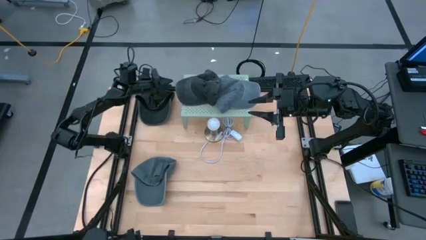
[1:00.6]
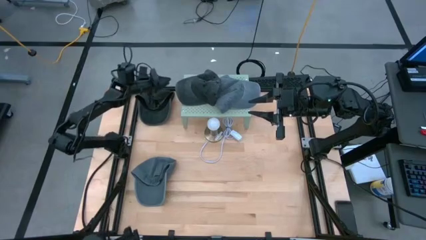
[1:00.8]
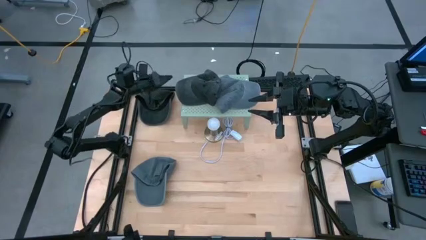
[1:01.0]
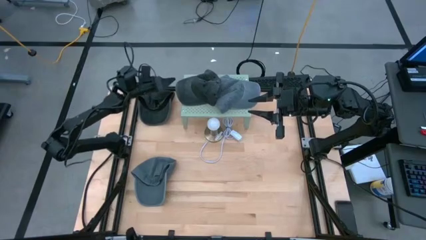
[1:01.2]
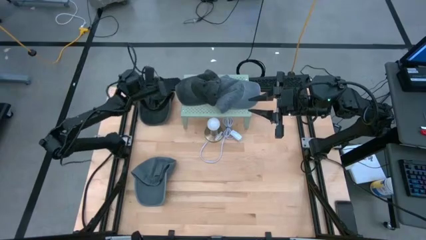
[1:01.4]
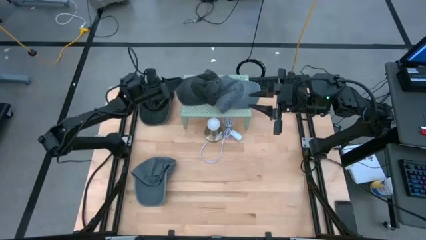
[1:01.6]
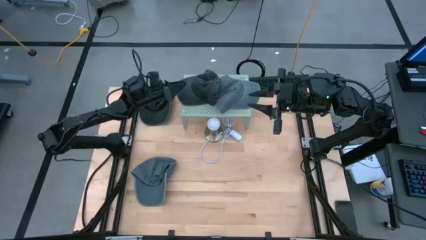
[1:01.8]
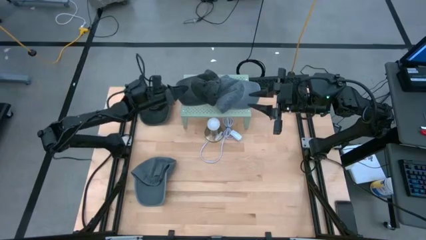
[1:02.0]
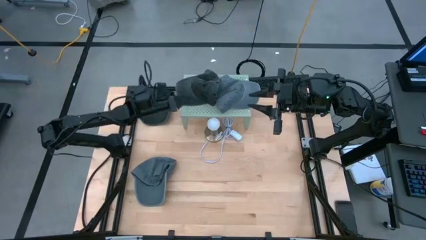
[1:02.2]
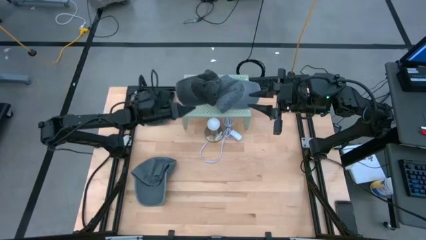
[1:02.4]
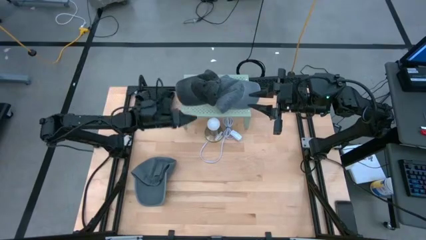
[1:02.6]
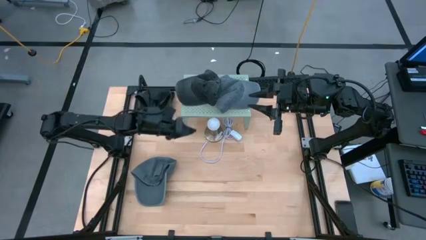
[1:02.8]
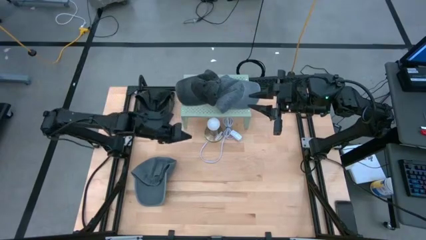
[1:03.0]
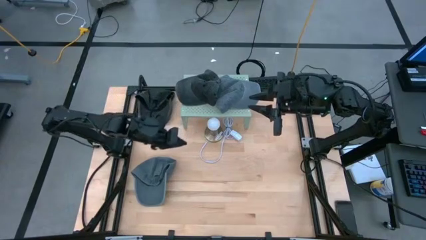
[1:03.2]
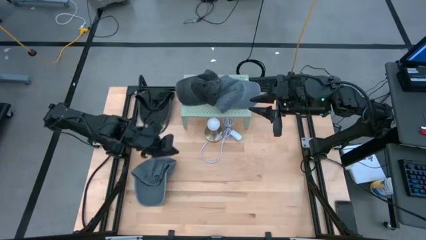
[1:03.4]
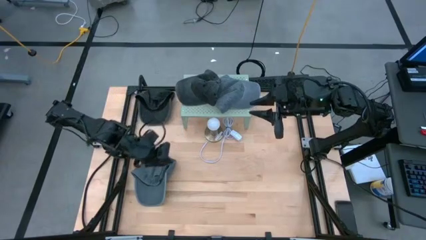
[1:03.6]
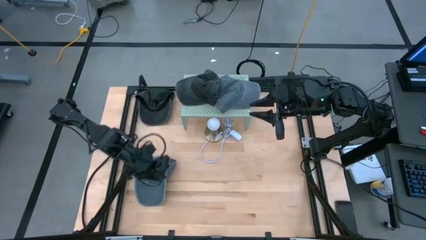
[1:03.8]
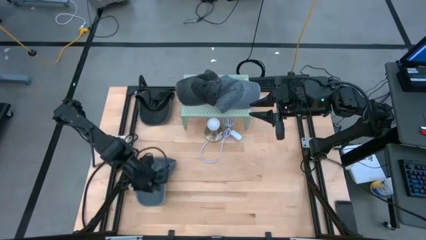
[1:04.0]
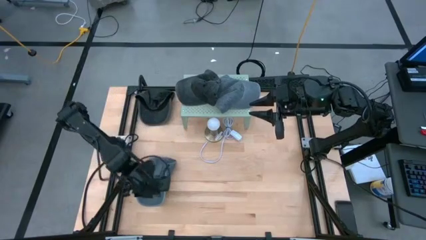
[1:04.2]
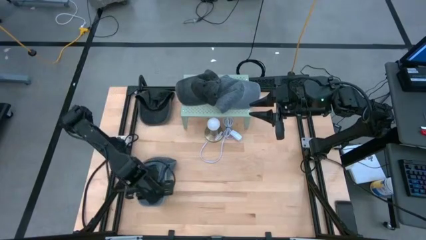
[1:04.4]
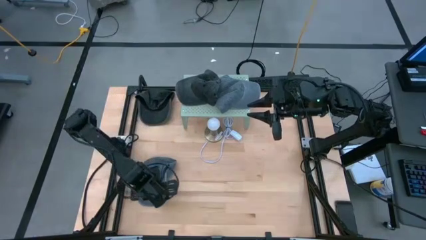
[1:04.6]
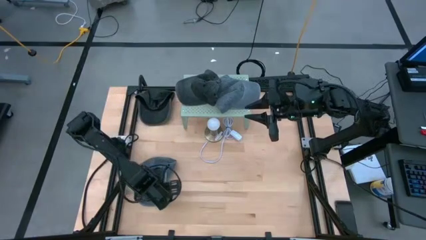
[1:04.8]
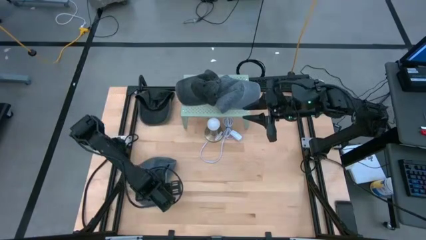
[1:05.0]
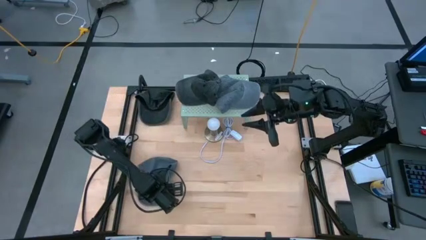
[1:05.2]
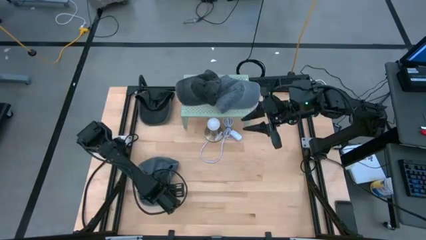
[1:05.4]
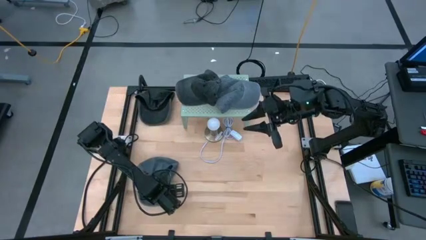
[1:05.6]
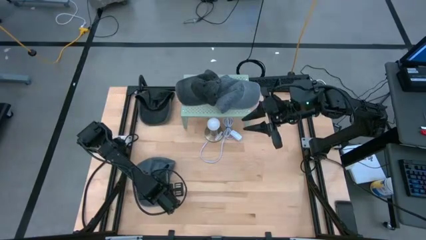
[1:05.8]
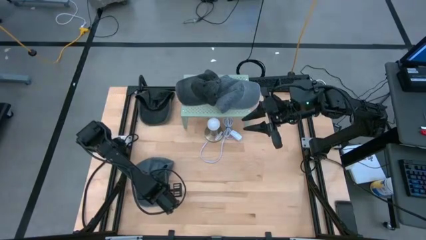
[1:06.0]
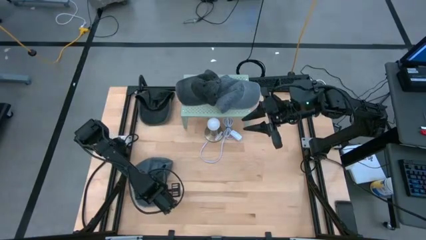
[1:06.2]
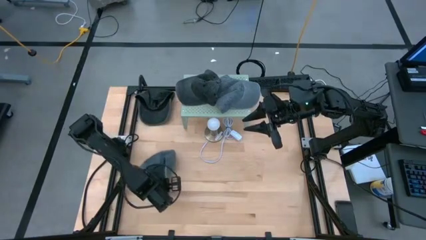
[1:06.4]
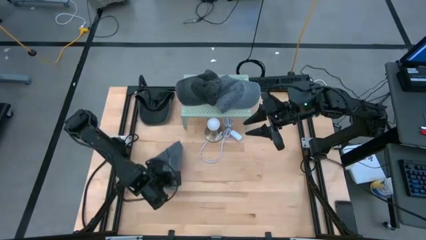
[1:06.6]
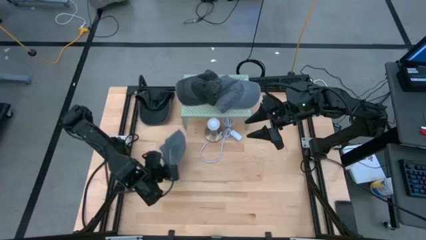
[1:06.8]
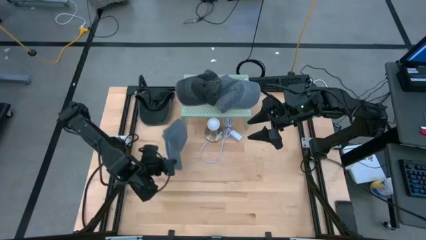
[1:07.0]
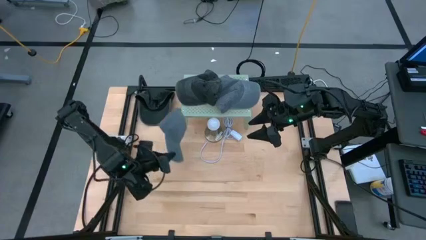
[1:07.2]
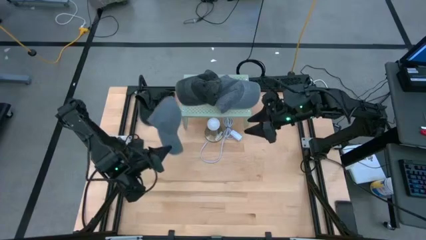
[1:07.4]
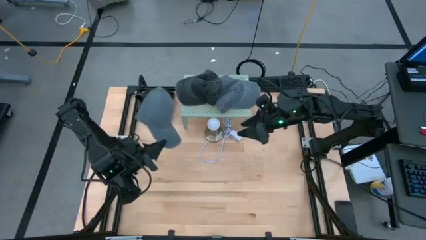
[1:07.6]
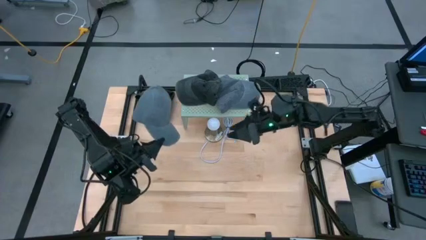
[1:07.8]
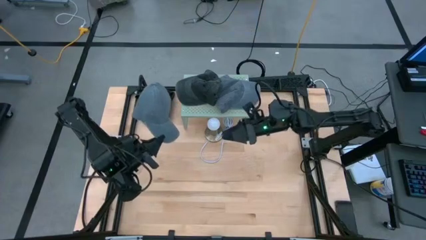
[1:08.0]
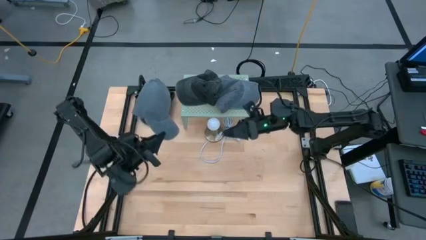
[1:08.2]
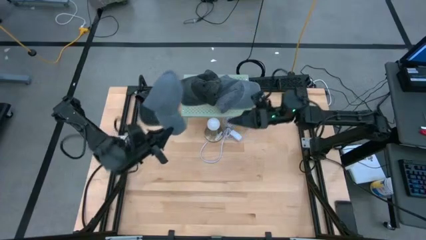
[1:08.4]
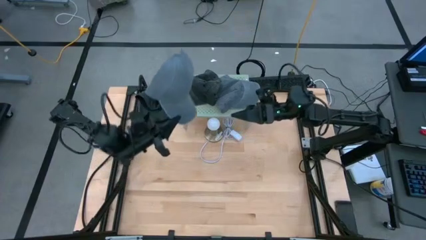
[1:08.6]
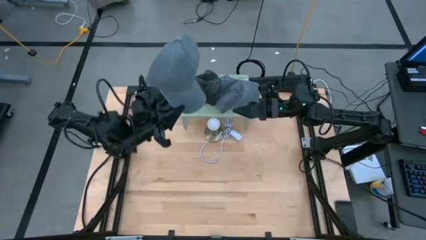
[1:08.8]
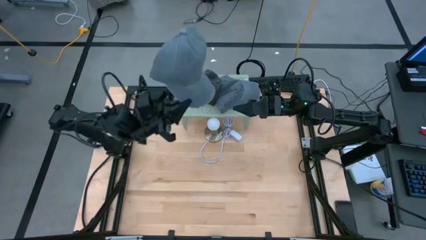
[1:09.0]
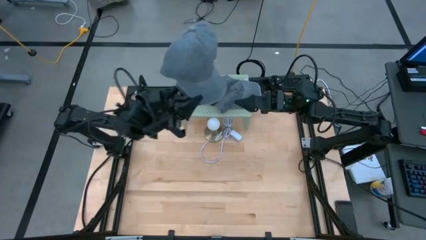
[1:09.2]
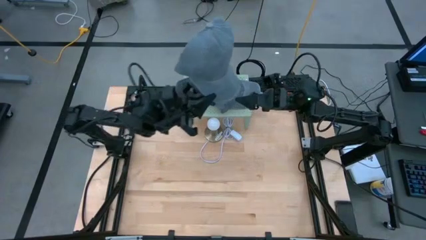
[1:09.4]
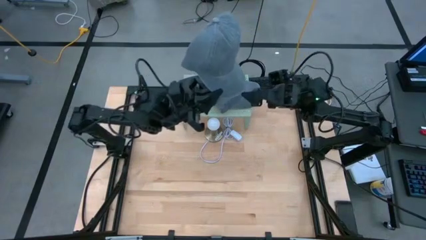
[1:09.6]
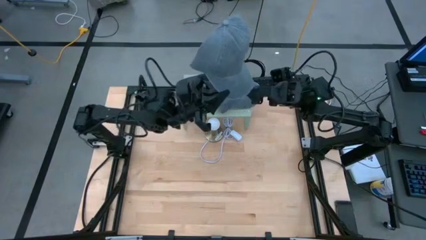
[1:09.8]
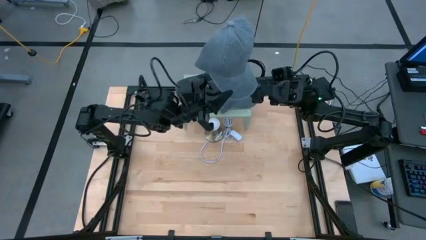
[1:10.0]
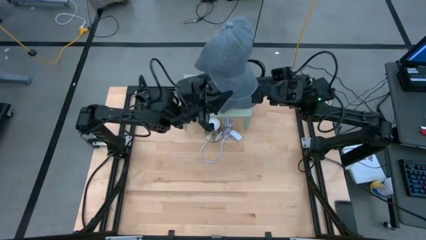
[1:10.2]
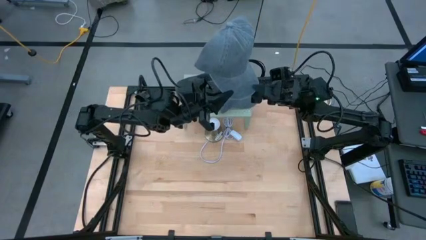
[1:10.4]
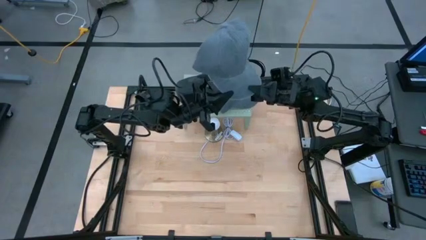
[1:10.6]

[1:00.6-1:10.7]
Task: Pick & Place hat
Stack the gray cap on the other gray cap on the shelf

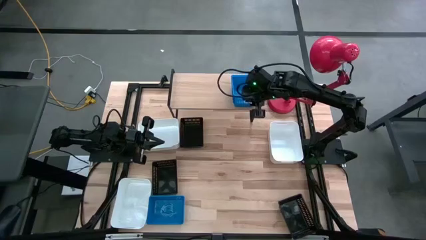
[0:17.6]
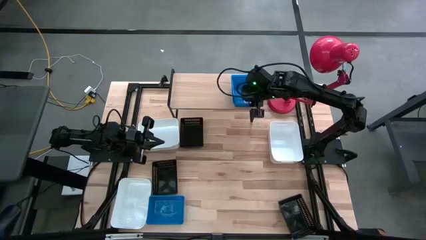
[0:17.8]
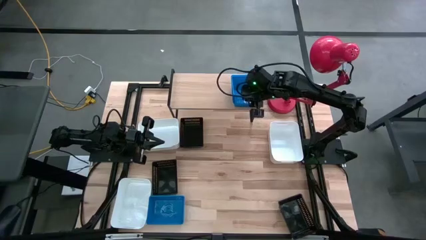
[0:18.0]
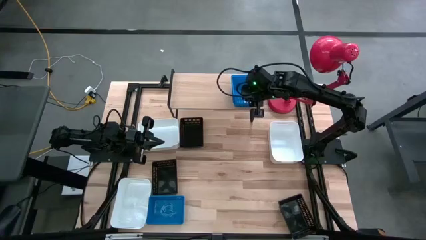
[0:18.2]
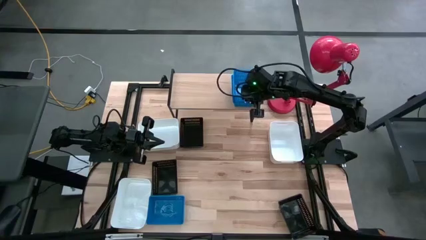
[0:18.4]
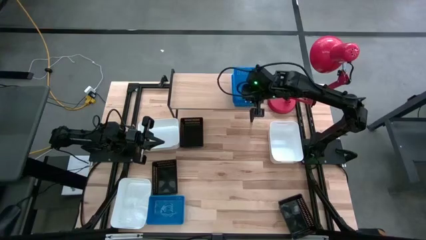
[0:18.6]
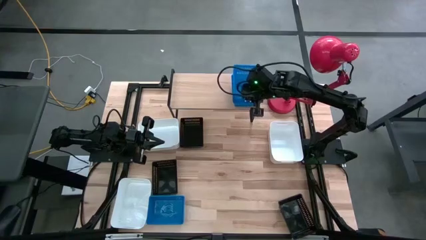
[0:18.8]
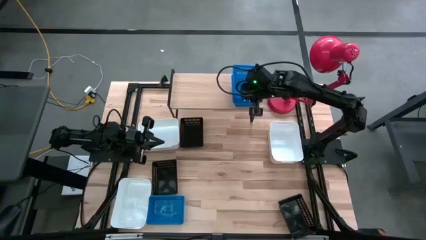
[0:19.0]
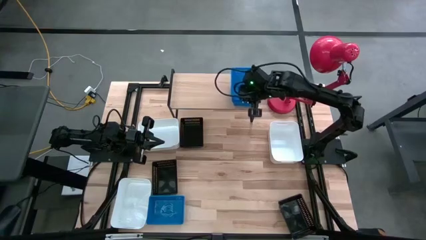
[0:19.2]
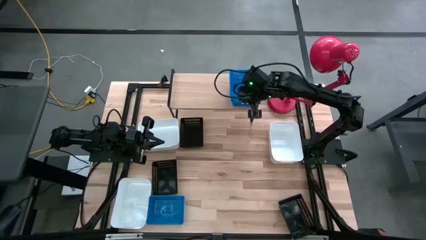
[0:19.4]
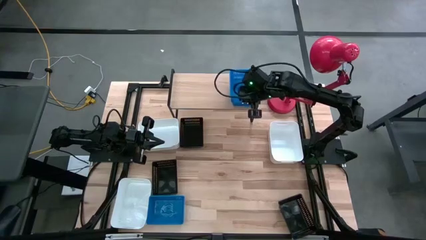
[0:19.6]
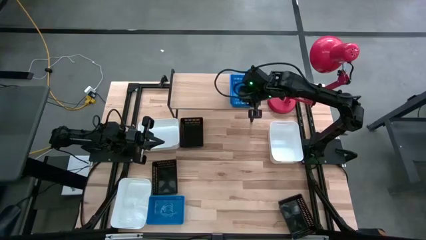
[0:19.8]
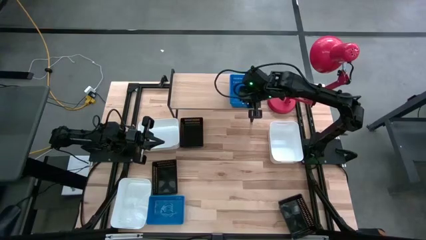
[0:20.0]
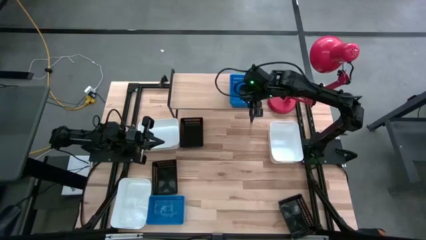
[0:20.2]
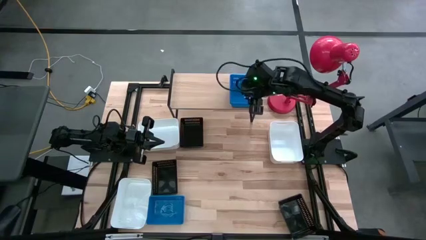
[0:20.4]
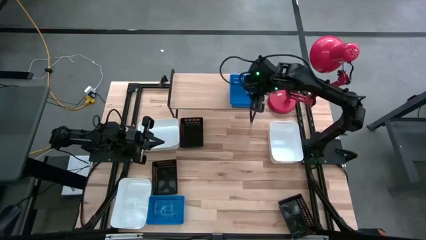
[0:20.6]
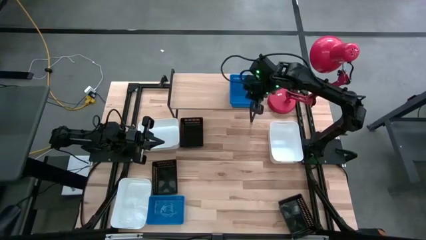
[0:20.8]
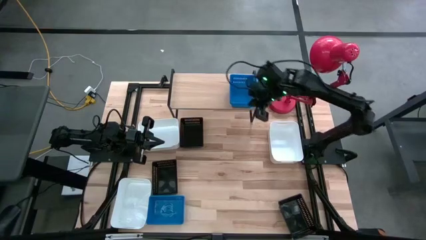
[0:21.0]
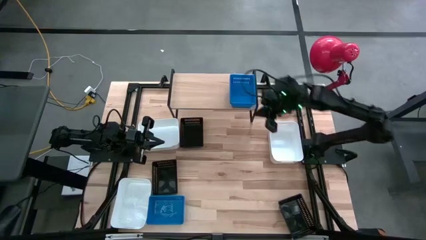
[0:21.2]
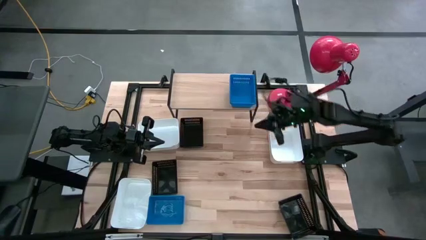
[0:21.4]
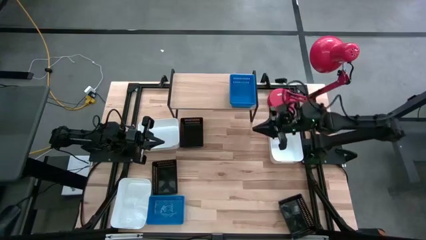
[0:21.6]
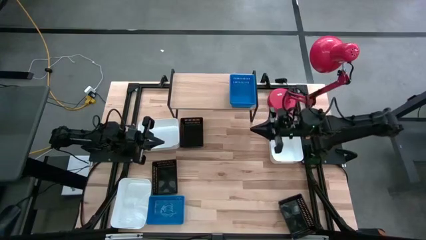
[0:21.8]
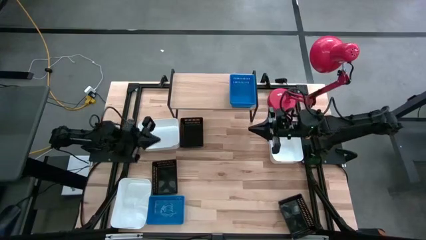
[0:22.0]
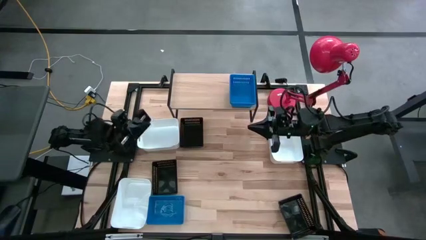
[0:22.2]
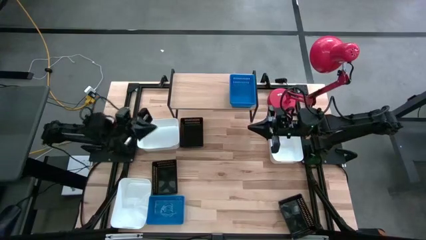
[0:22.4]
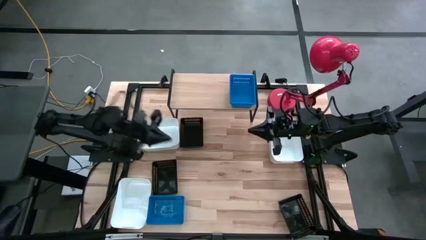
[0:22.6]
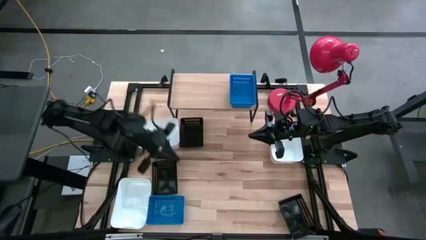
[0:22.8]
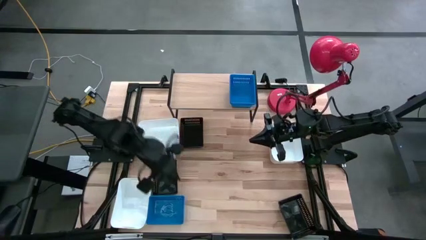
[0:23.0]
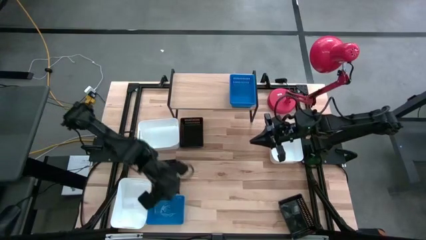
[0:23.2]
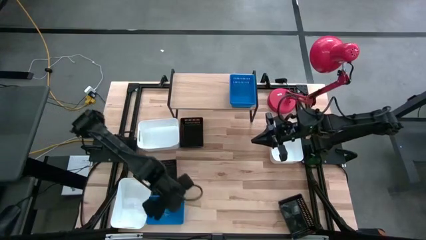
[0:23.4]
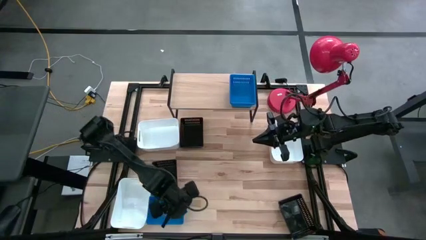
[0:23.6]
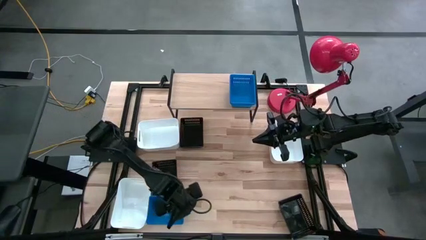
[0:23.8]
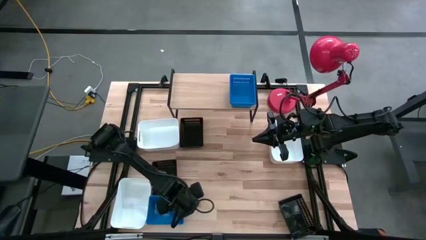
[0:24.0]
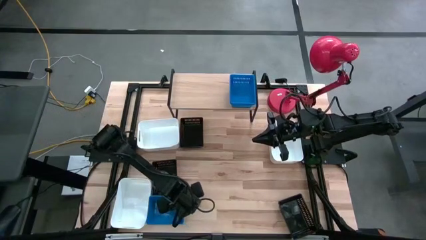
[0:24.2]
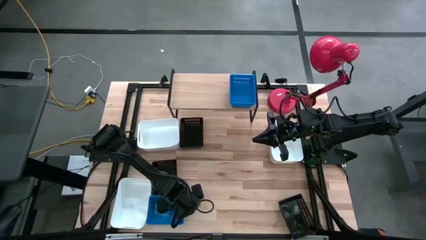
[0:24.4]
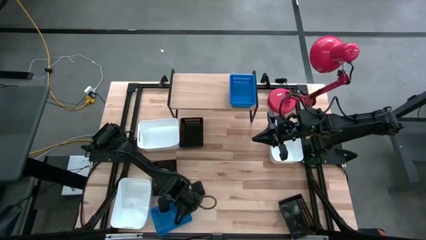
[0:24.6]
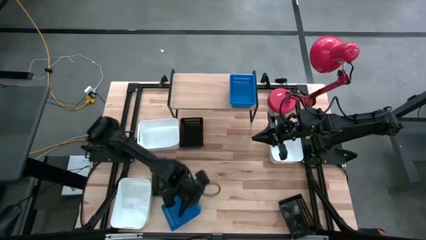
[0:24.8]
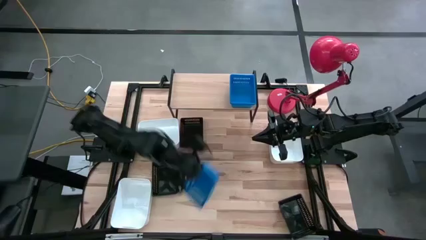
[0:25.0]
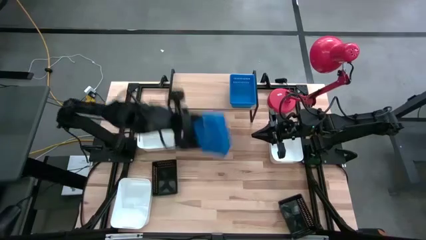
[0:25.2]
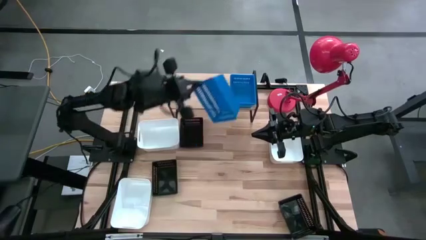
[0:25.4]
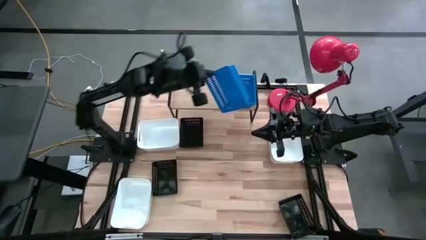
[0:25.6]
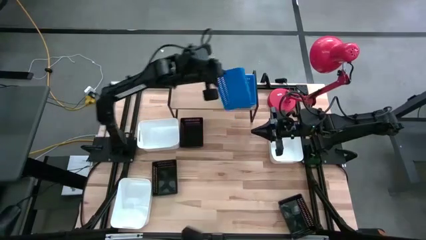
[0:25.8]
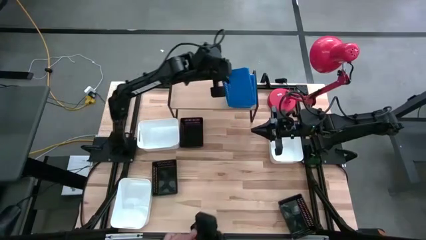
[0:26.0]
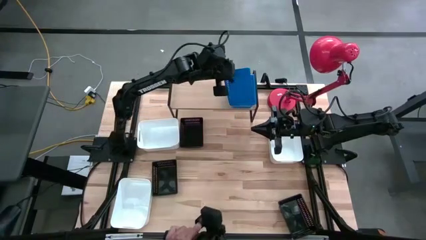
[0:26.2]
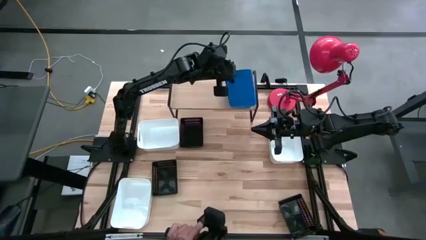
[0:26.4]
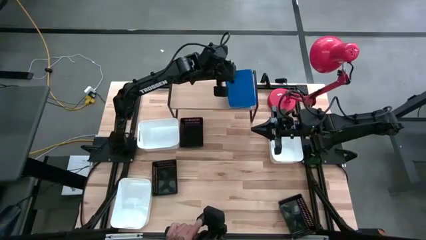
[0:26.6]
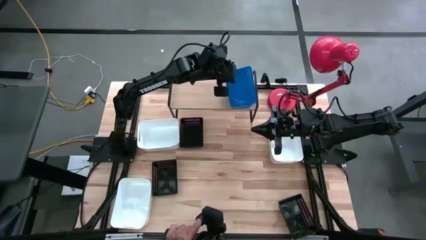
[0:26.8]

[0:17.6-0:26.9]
Task: Stack baskets on shelf by color
Stack the blue basket on top of the blue bin on the shelf
